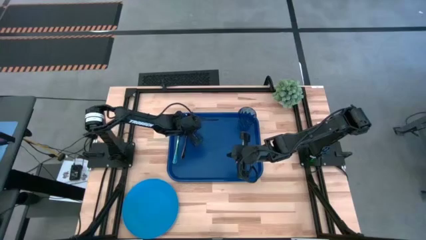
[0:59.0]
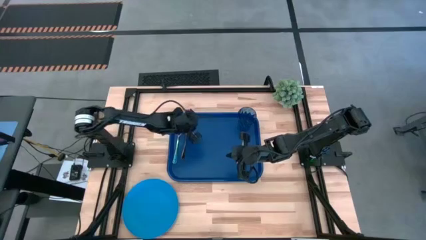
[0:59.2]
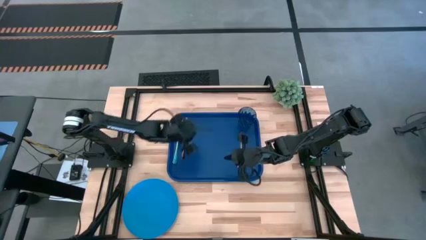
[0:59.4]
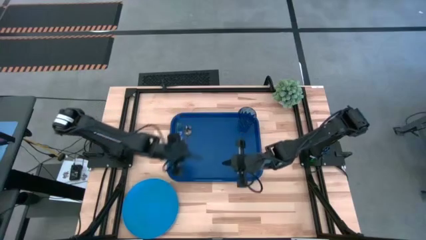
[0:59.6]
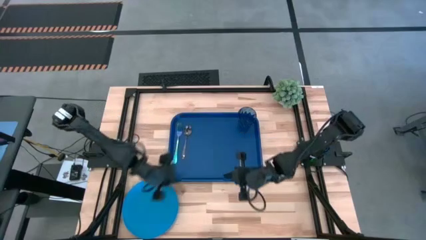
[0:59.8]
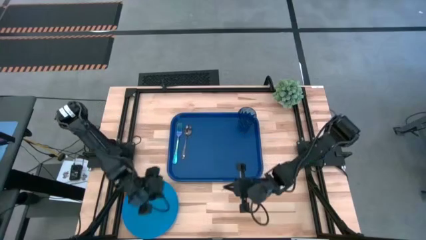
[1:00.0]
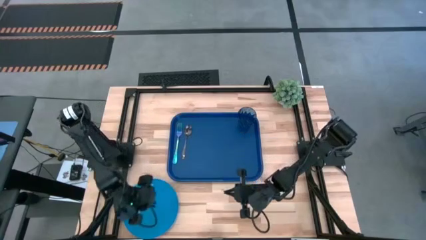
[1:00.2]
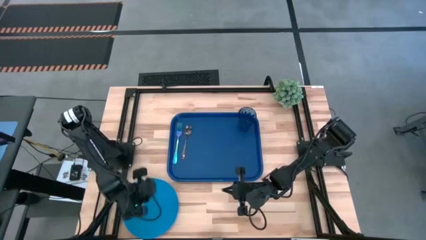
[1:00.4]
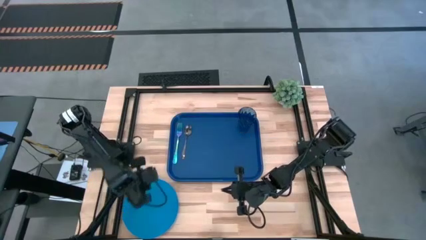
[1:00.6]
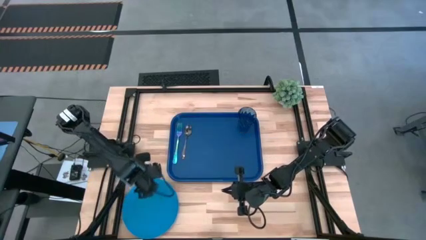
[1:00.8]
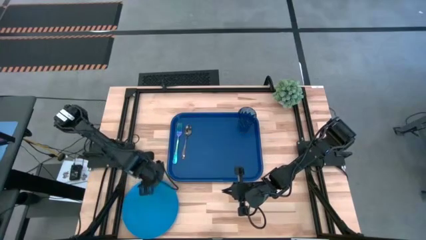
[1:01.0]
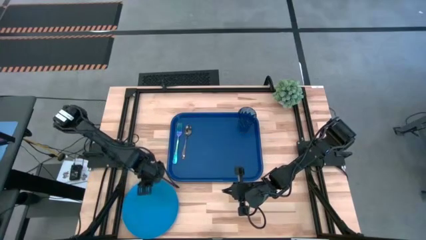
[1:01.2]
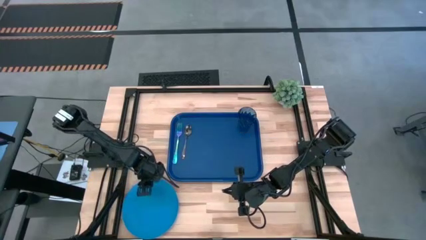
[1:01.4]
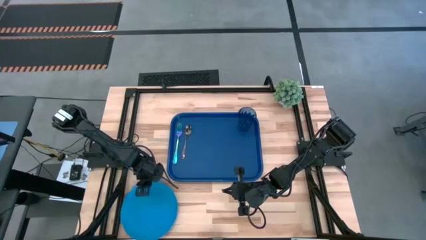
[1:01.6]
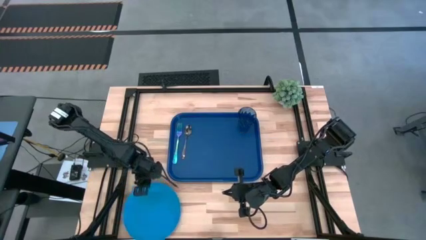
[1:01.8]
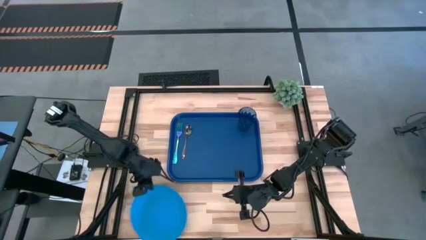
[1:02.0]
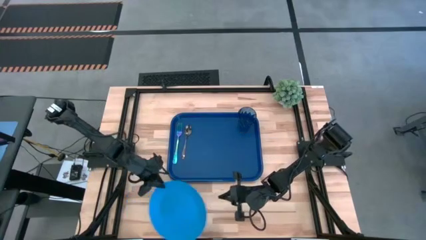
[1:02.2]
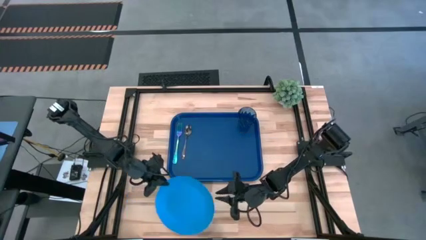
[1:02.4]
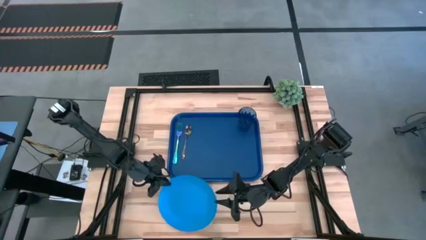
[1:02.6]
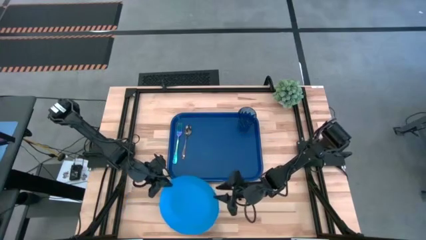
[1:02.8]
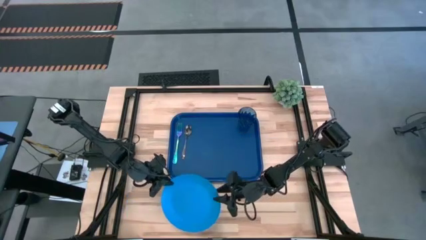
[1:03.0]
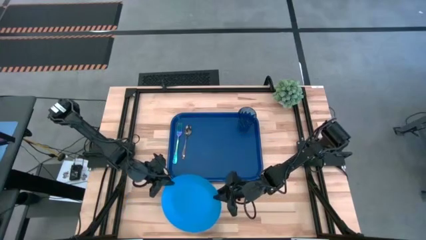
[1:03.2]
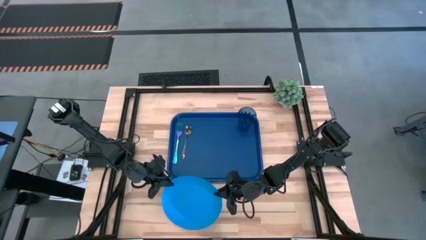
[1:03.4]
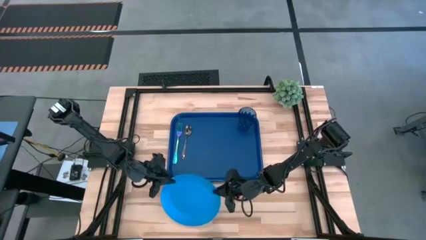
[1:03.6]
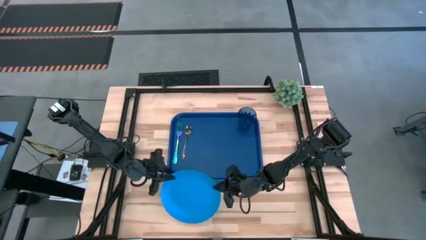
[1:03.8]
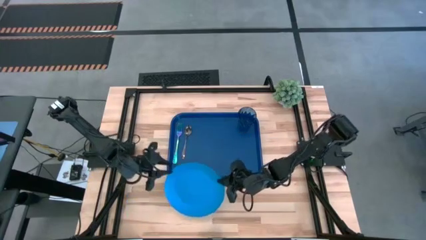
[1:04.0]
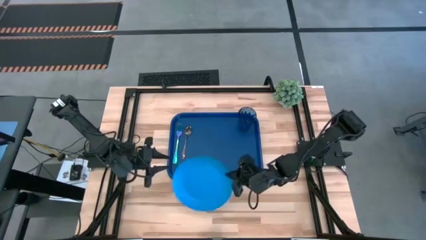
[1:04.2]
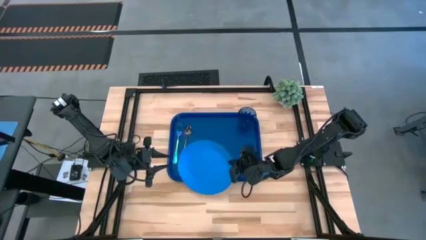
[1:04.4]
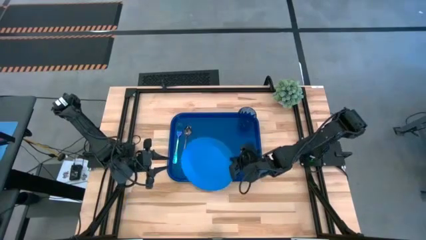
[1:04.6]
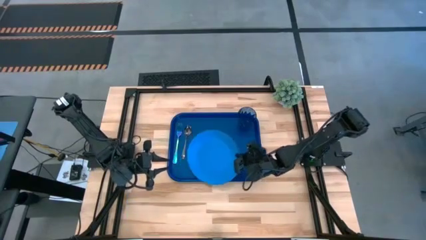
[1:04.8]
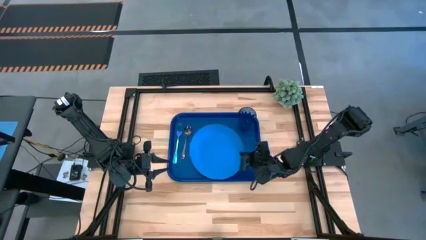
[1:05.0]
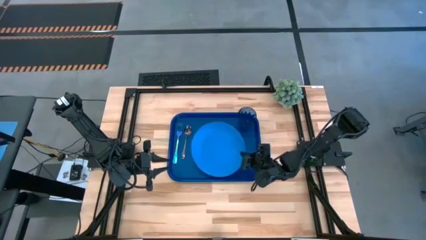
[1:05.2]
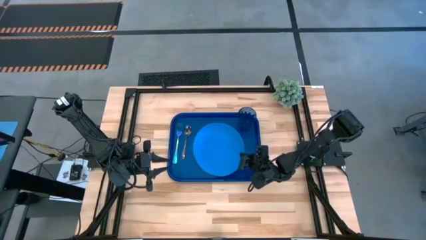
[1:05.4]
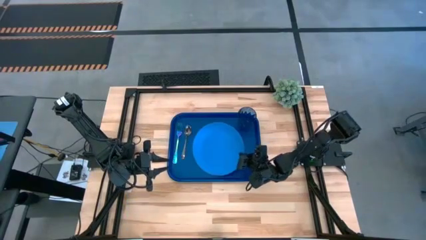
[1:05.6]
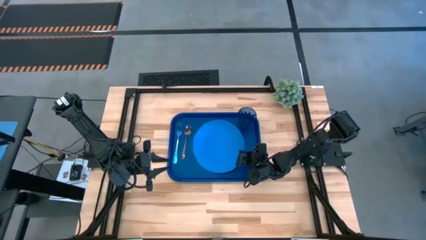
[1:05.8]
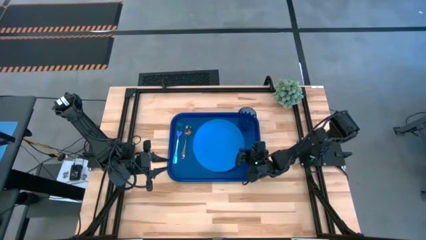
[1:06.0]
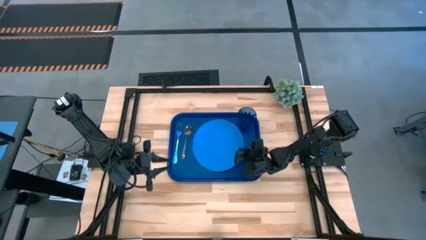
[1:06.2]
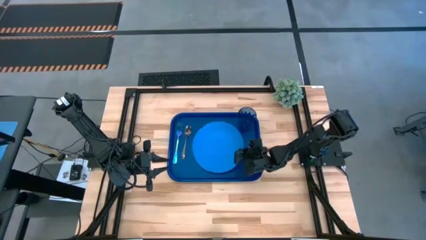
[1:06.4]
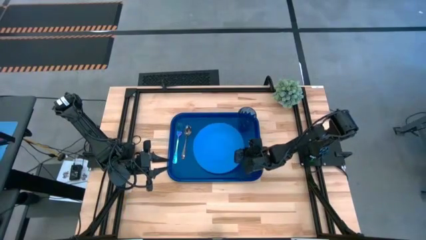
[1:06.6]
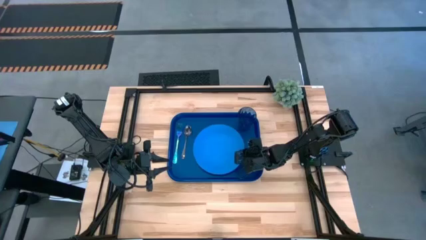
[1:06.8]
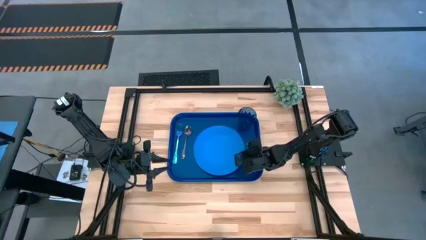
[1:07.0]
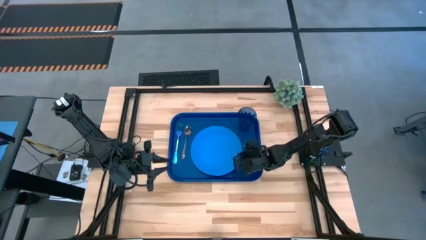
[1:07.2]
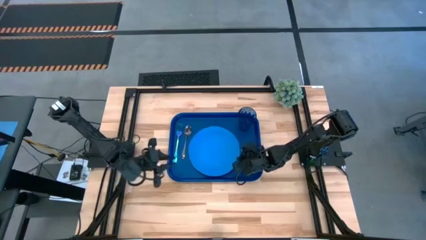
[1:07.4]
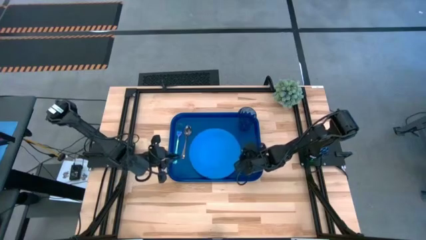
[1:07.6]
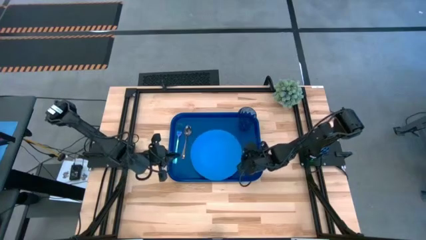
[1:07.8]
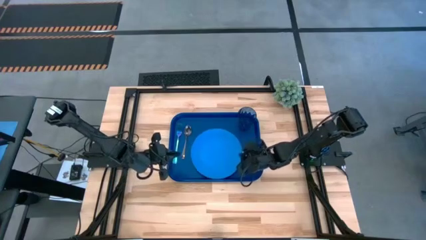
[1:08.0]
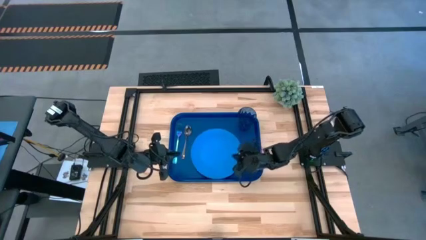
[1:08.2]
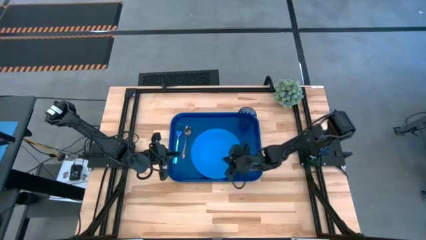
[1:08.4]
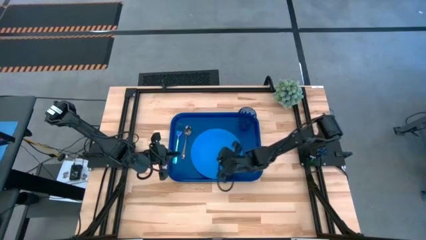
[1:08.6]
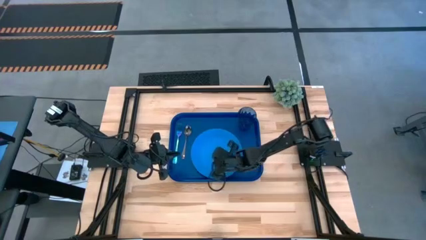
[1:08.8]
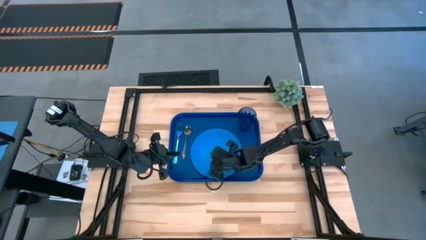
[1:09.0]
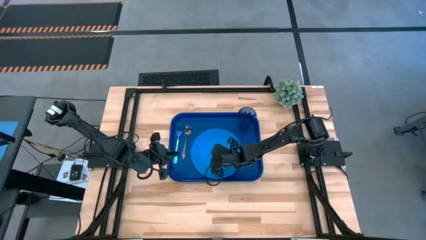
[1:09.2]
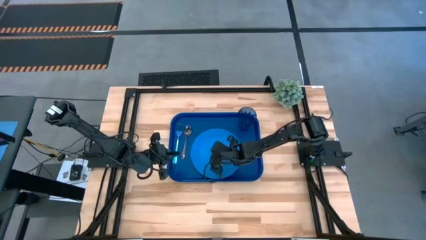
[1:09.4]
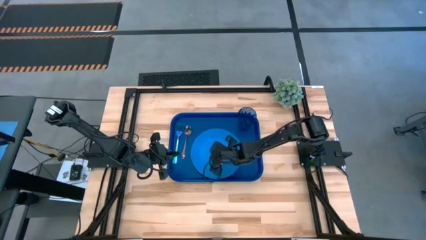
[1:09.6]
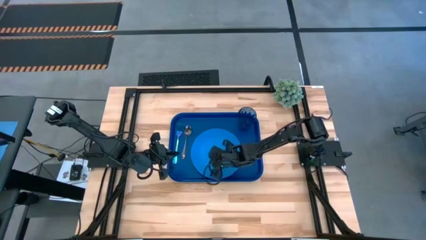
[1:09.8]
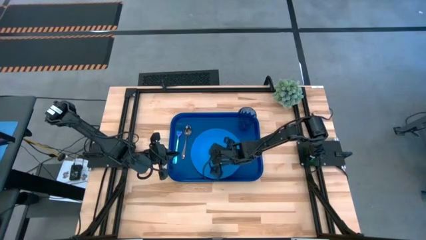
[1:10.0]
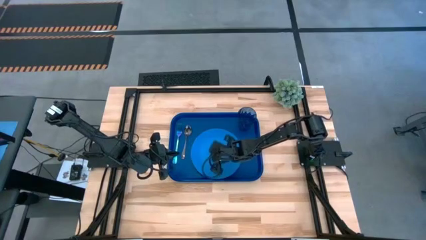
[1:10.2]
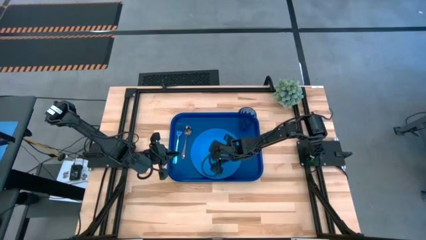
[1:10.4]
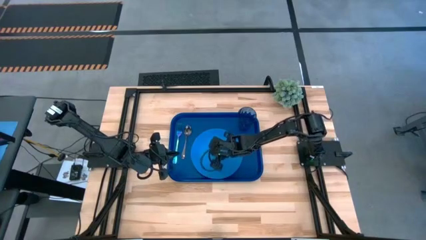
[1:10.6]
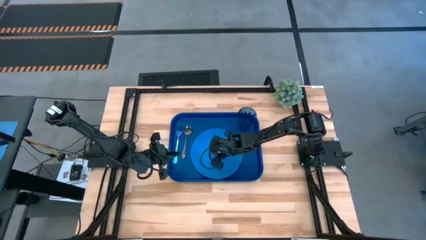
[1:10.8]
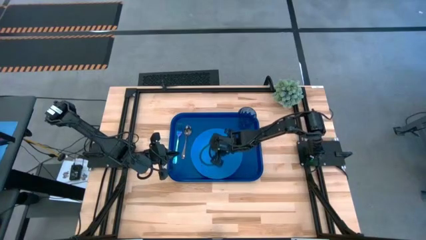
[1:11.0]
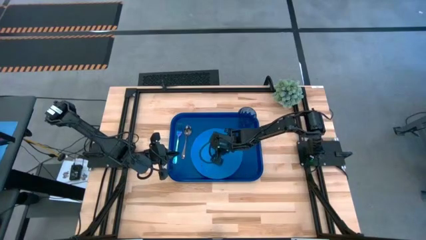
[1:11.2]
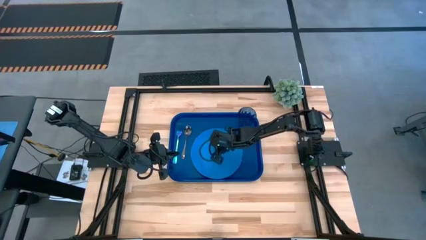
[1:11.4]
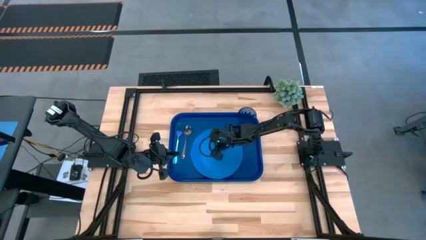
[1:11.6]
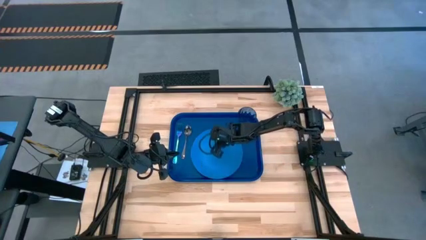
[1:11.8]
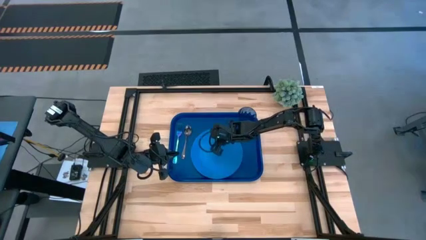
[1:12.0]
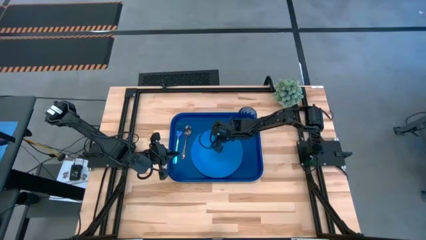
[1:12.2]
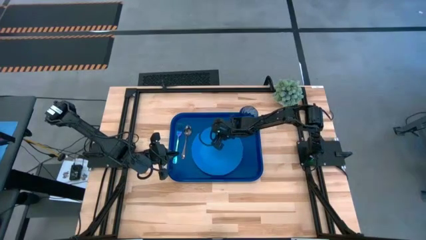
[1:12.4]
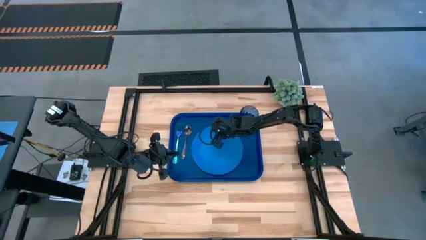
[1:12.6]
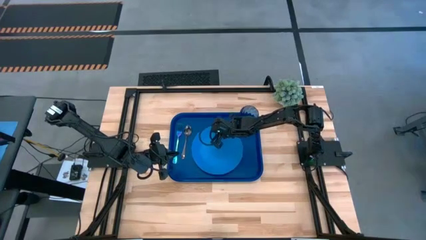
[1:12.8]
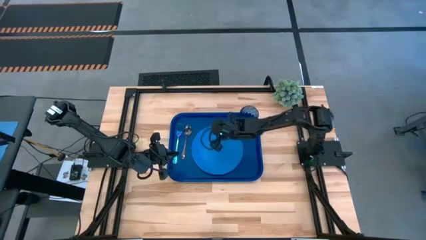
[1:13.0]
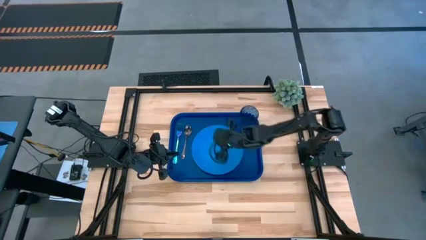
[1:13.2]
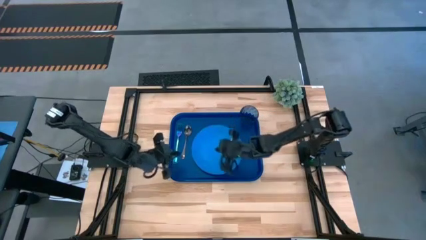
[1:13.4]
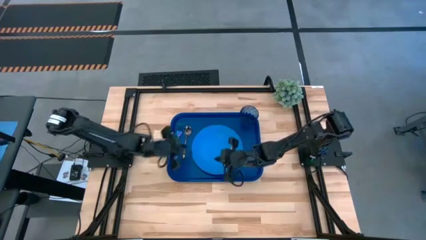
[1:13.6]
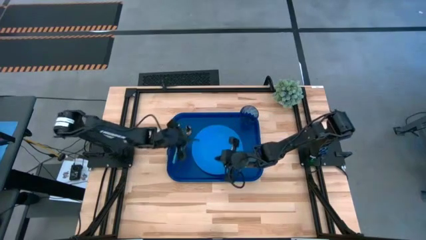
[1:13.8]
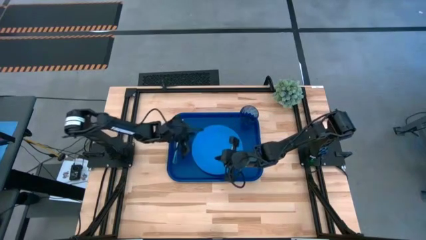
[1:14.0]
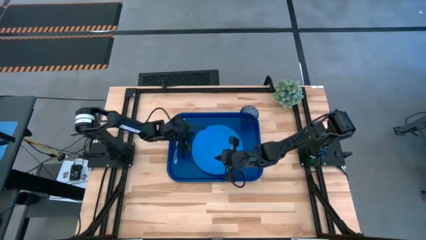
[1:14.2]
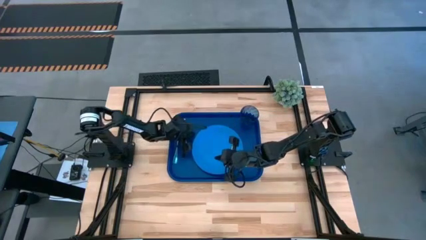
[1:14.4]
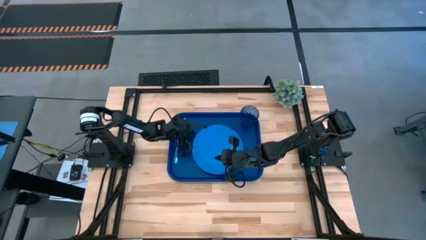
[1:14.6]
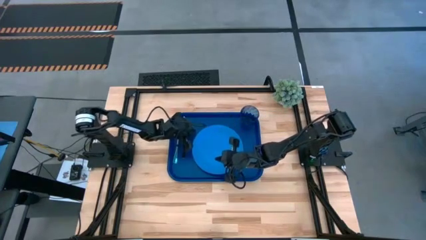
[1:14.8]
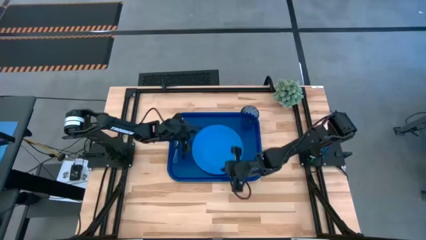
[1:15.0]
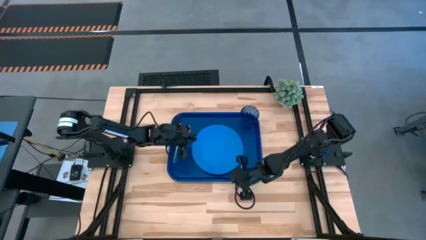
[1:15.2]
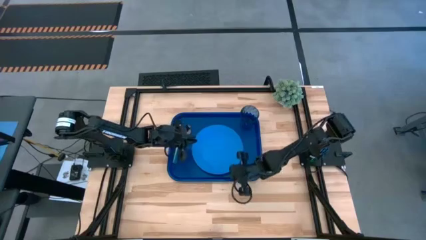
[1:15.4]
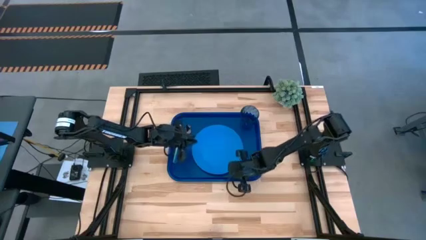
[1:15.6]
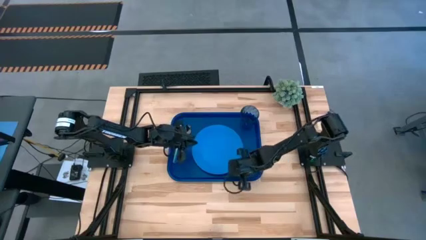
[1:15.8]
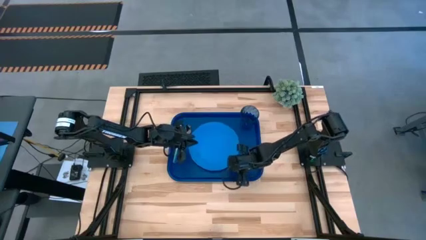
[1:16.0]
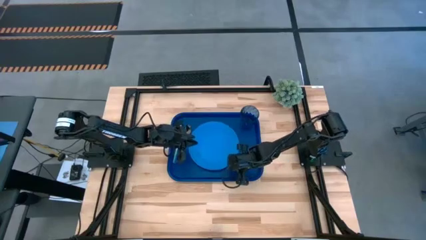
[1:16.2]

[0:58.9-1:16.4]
Task: Pick and place plate/cup/fork/spoon on tray
Put the light blue plate in the middle of the blue tray
